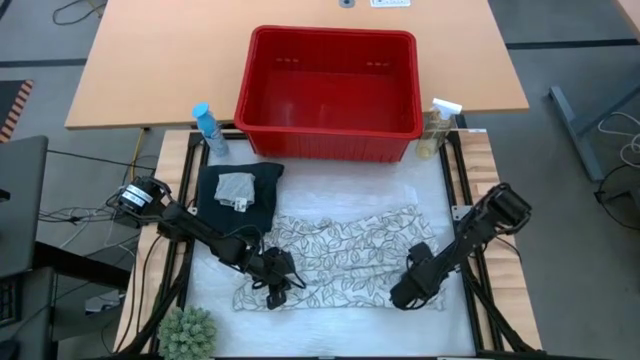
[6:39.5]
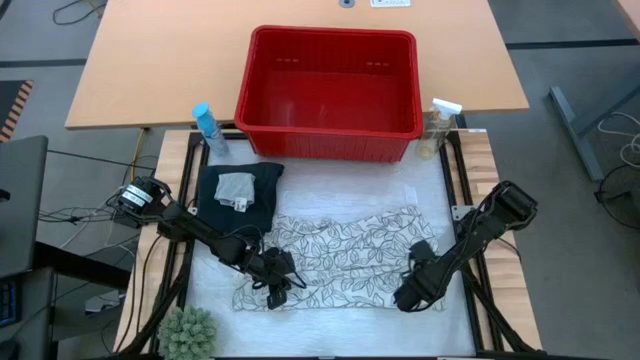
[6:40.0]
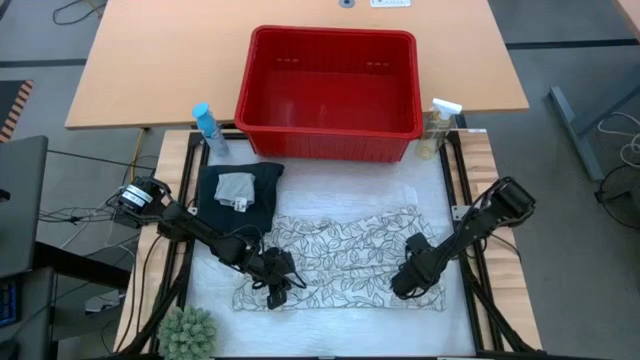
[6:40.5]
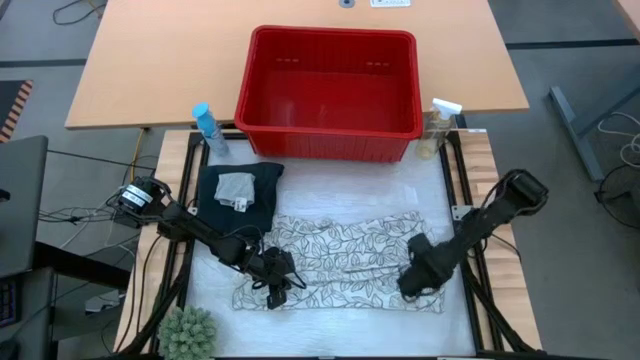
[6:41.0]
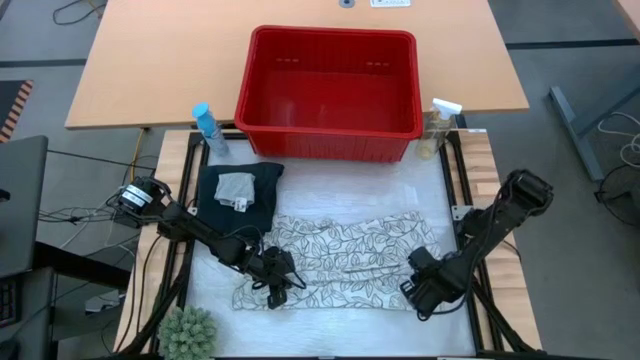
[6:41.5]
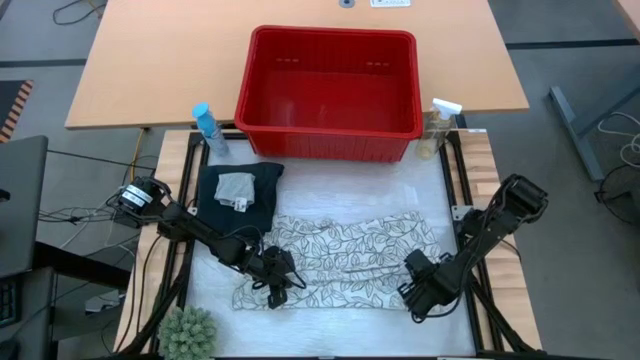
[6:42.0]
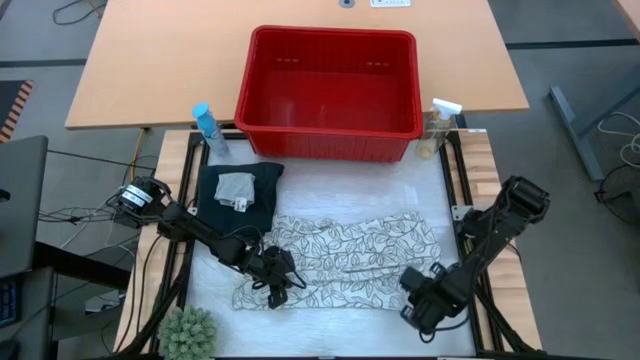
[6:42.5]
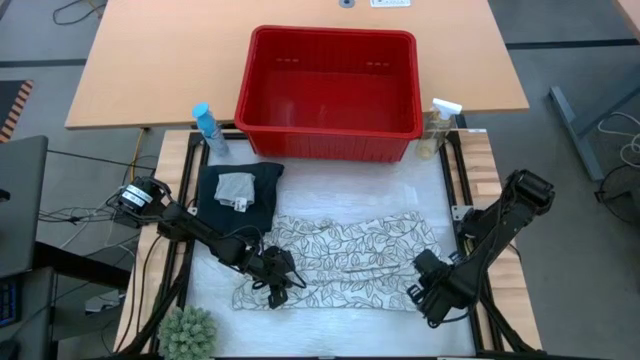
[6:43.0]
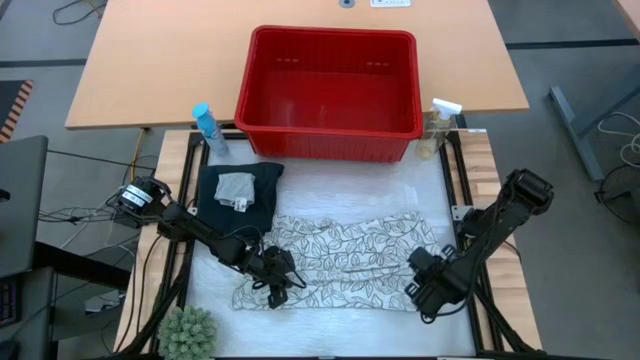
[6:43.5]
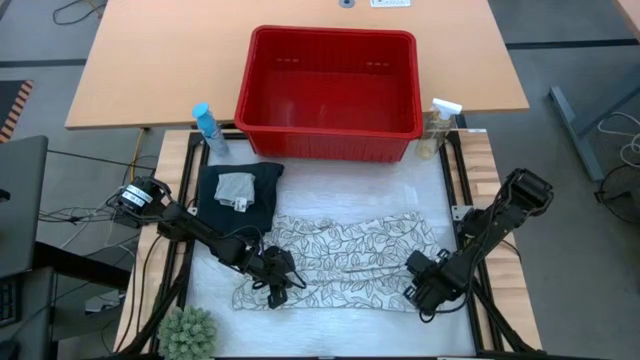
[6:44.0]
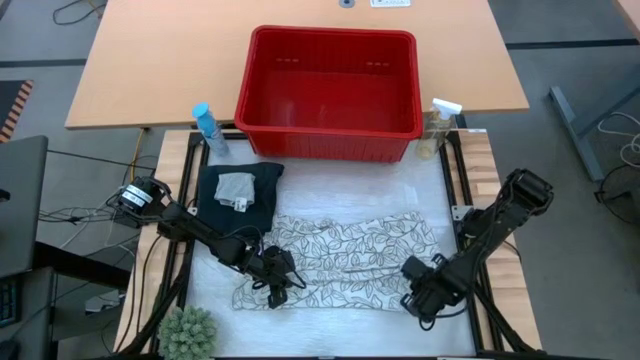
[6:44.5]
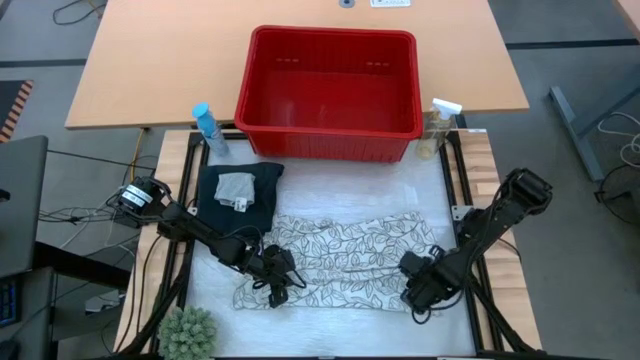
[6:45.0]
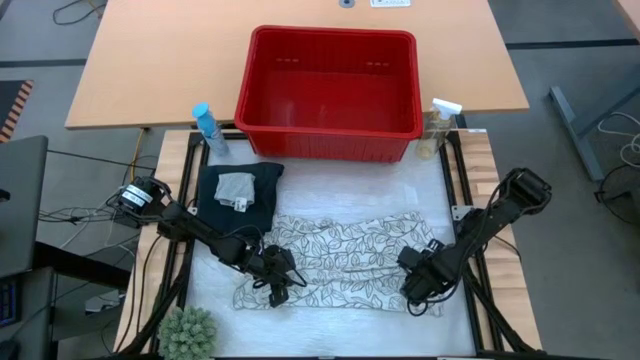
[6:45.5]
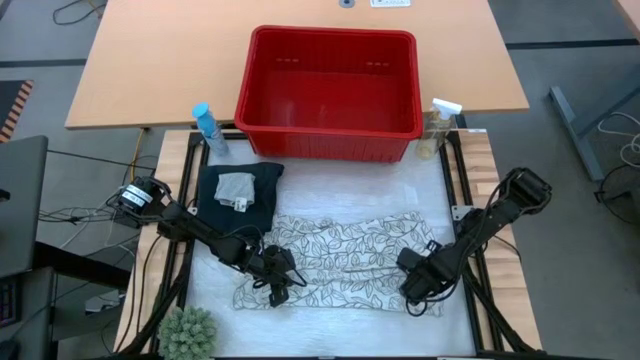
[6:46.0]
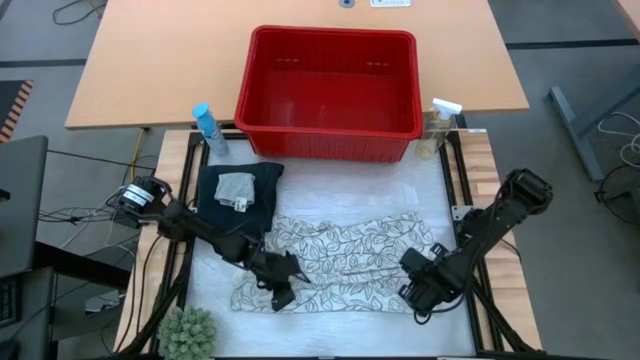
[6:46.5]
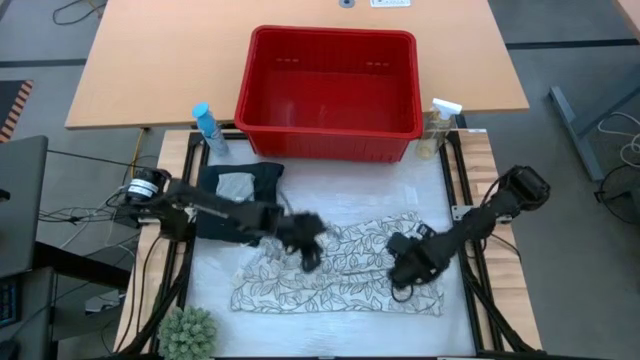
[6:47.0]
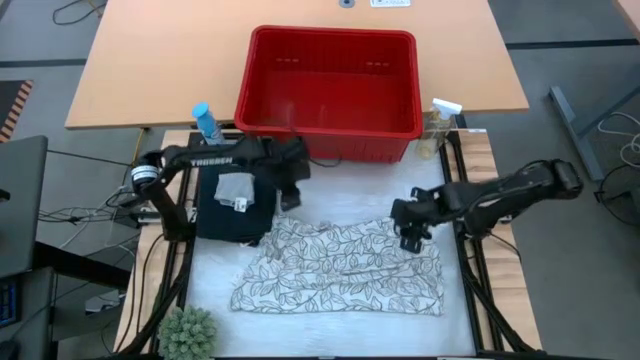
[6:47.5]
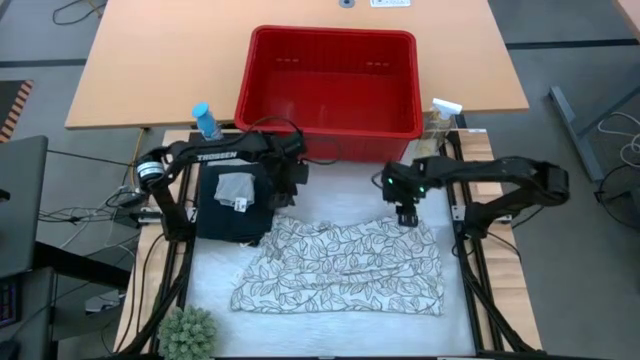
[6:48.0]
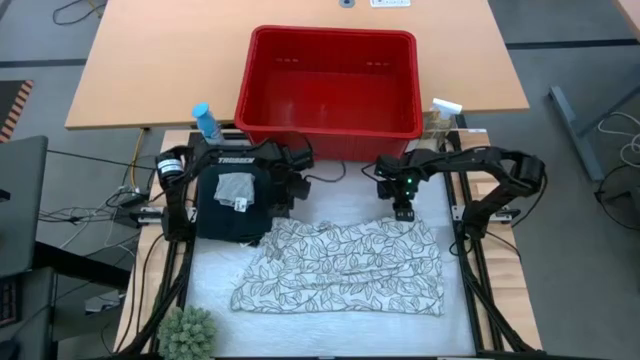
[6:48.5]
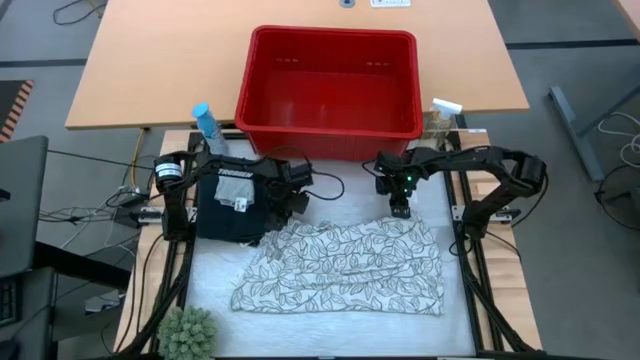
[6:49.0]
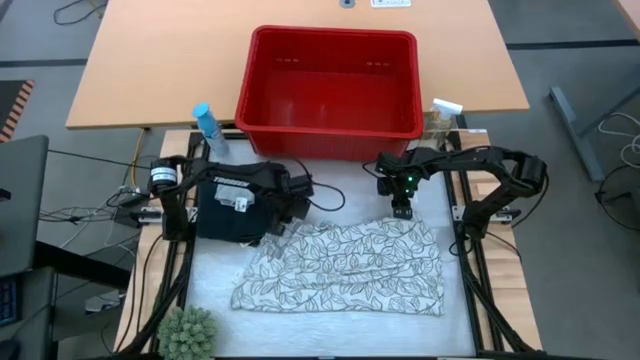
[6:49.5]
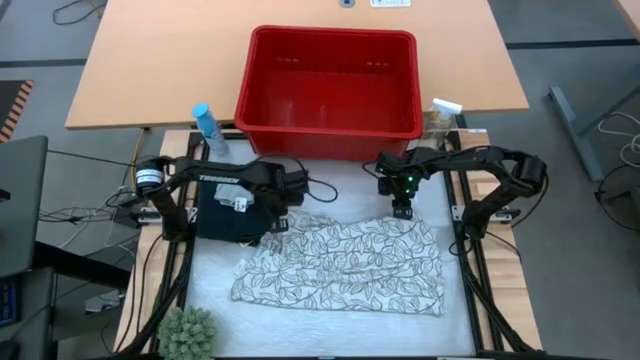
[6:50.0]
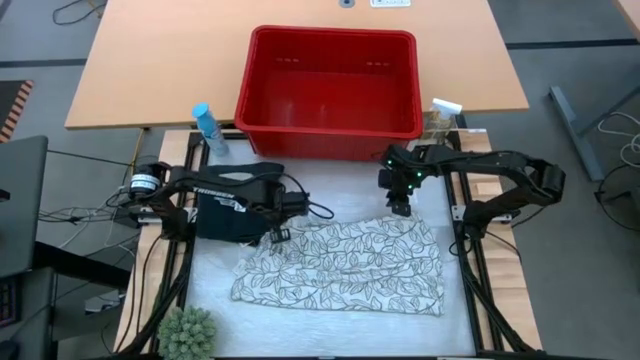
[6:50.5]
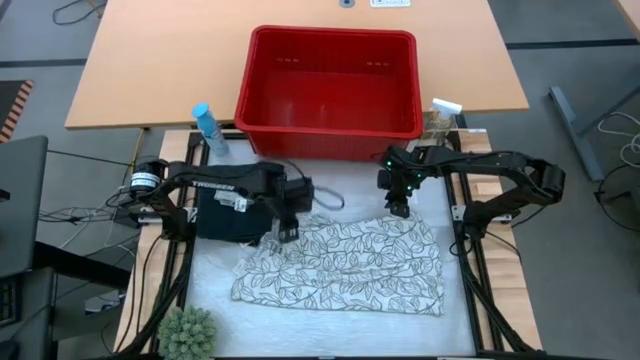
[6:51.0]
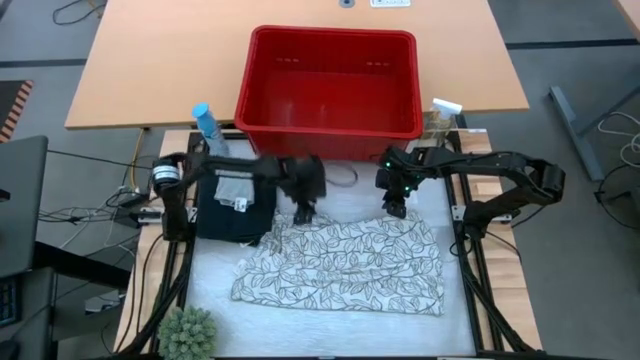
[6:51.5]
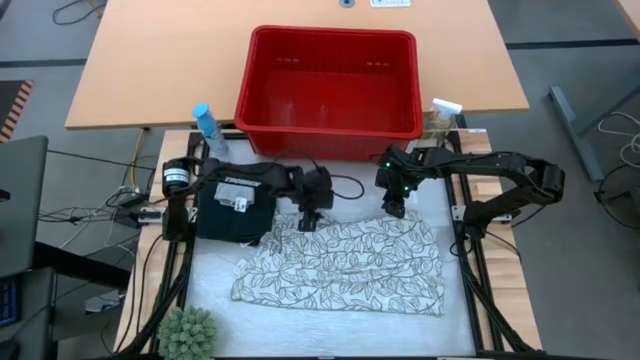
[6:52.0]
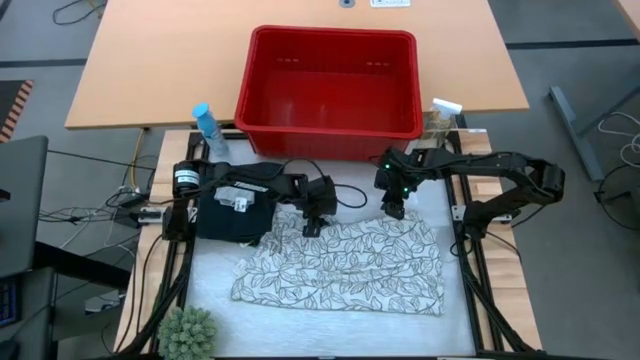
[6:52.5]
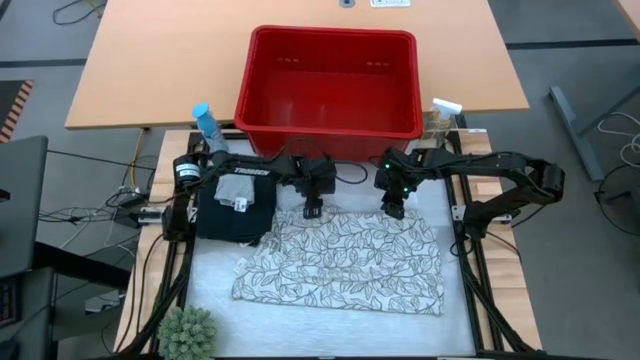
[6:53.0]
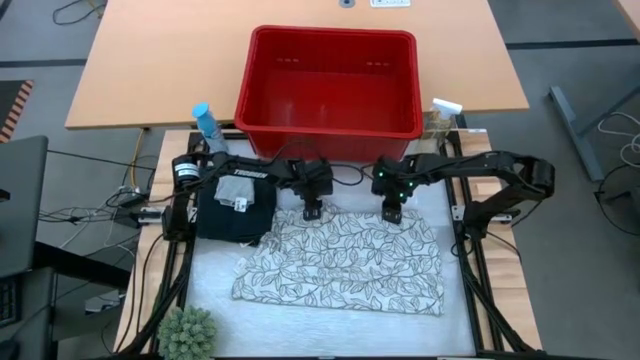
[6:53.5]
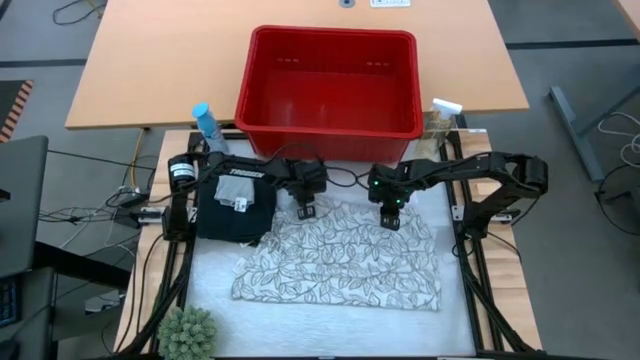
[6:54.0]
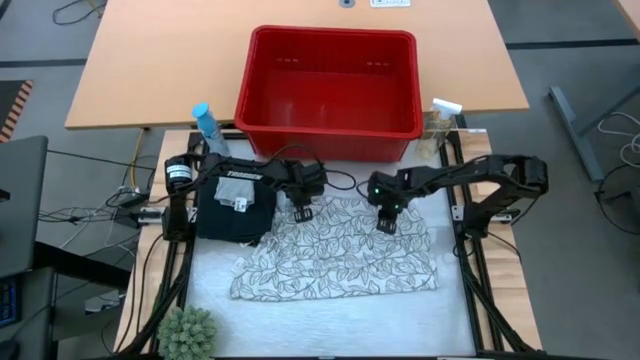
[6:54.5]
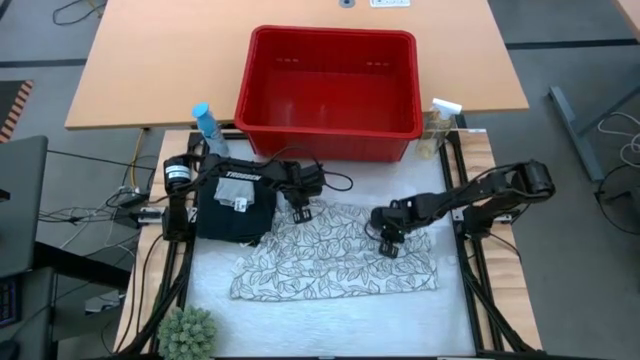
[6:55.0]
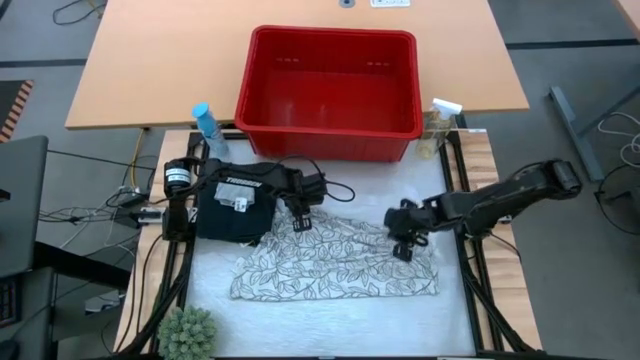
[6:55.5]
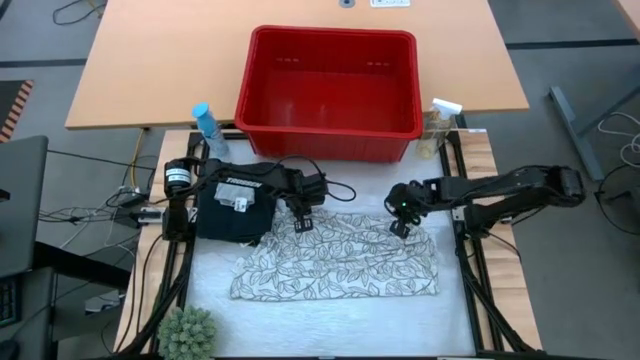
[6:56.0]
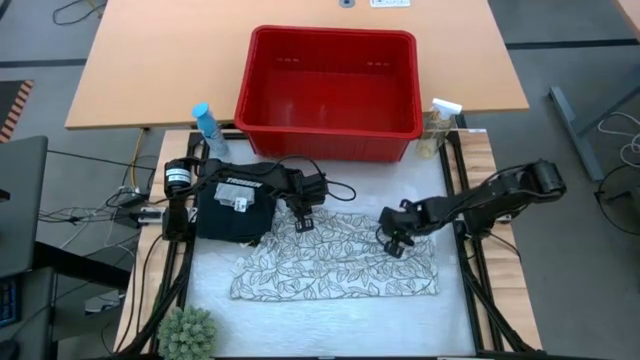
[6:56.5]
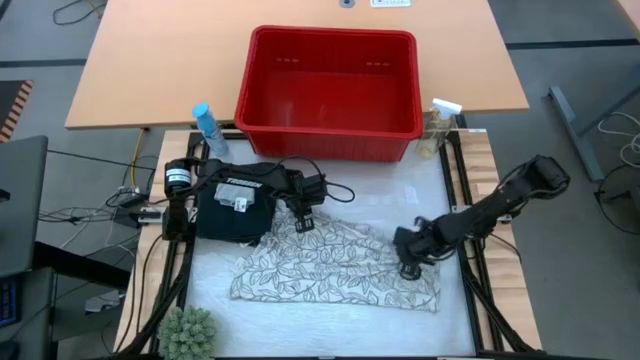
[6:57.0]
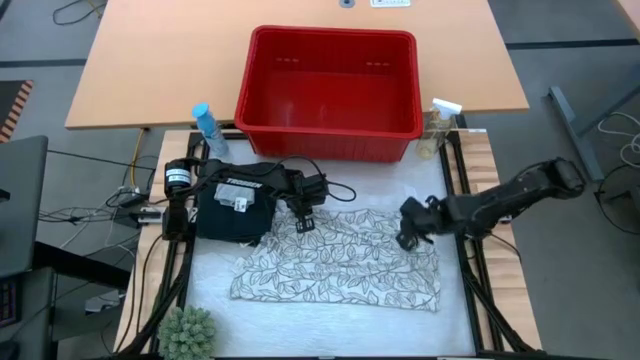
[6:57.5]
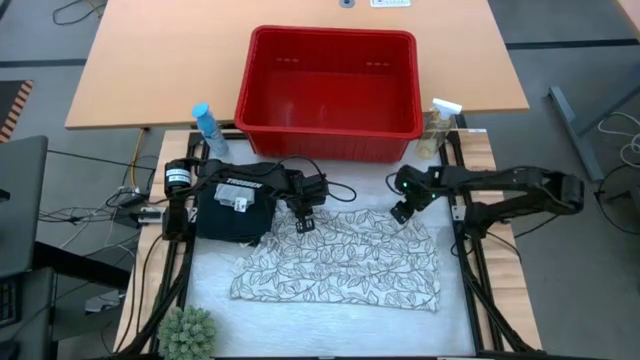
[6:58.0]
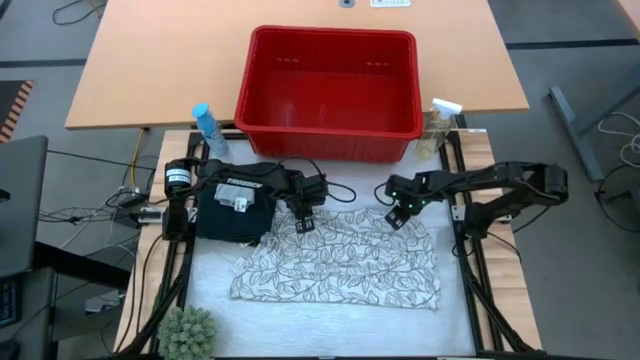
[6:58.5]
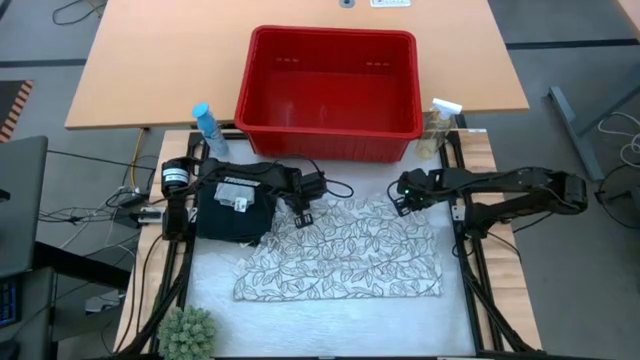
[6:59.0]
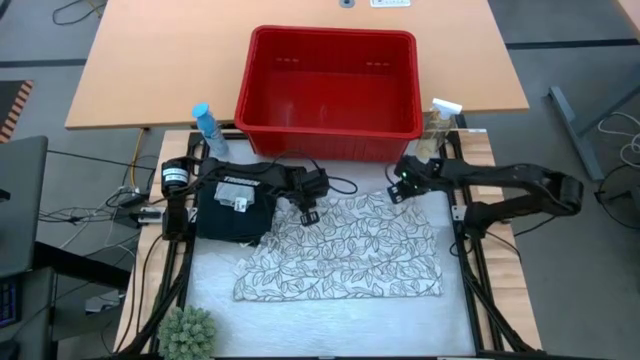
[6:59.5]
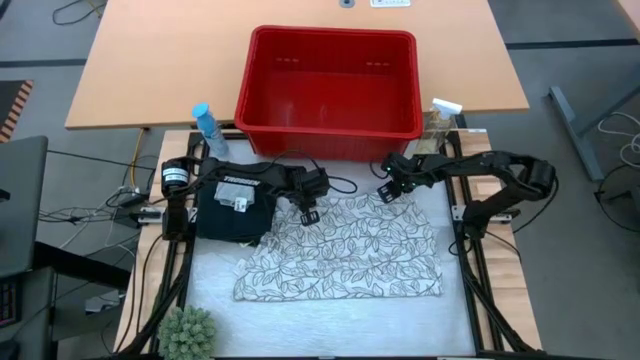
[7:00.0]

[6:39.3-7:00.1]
Task: Fold Laundry from Bin
Fold the white patterned shirt
